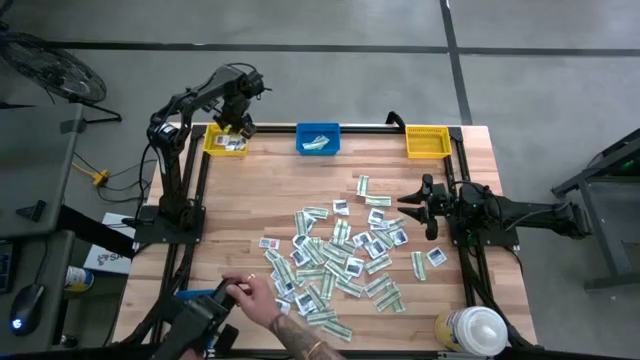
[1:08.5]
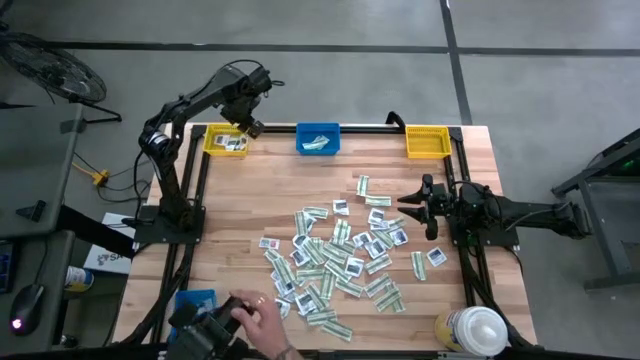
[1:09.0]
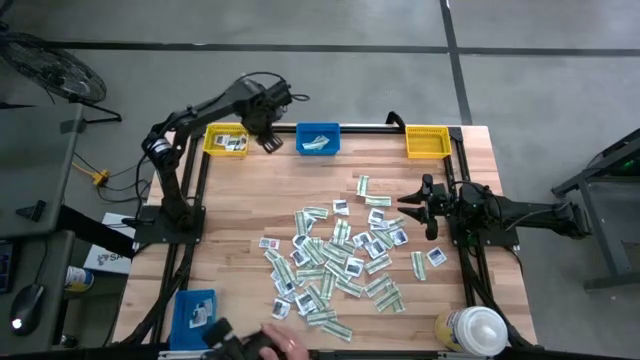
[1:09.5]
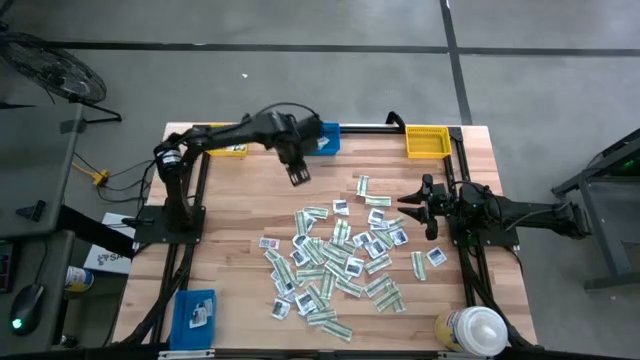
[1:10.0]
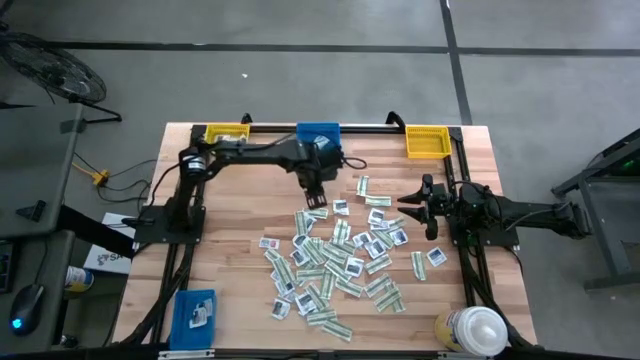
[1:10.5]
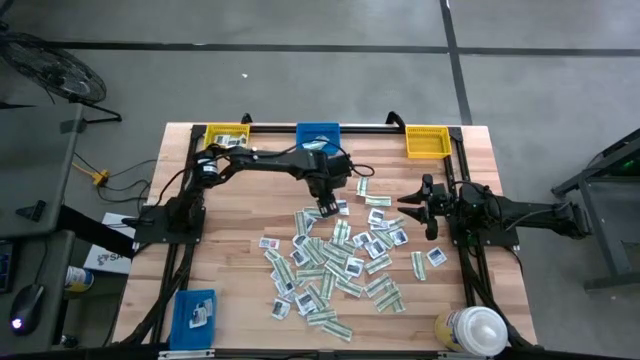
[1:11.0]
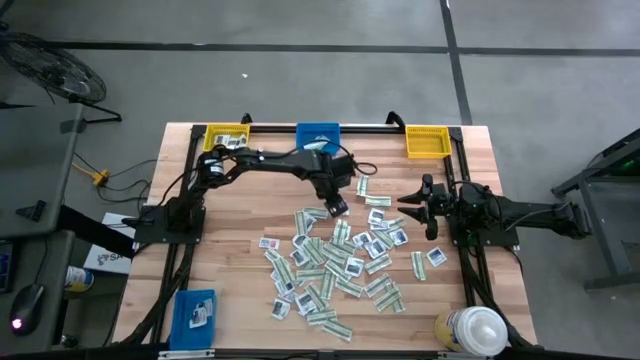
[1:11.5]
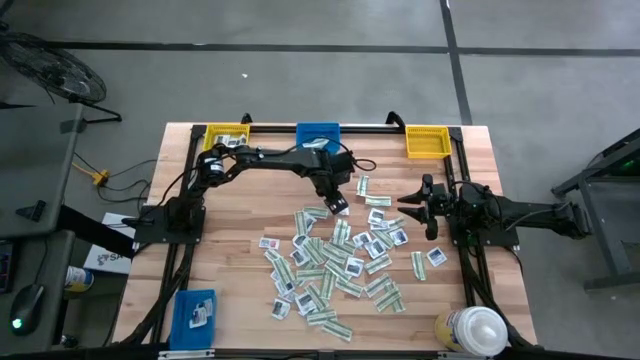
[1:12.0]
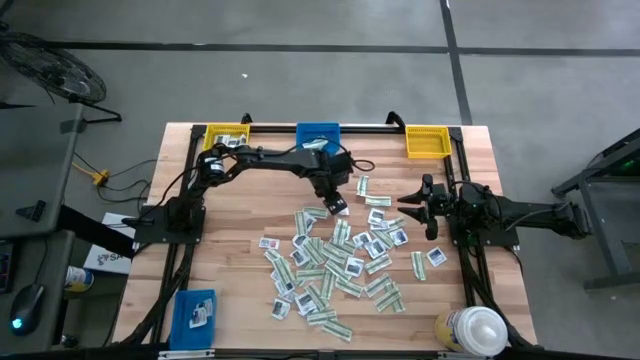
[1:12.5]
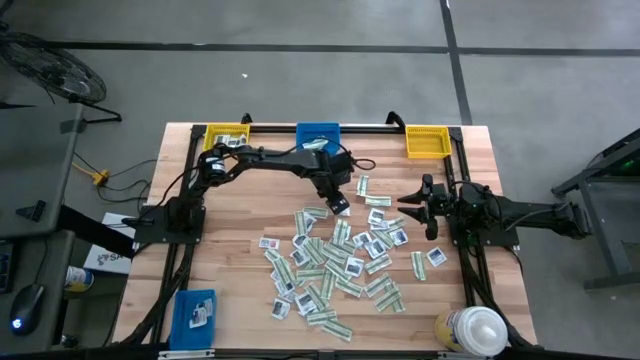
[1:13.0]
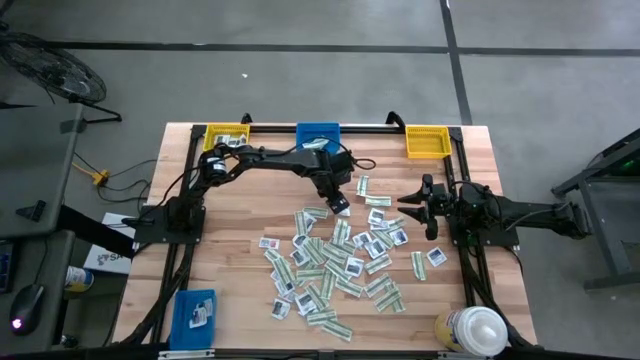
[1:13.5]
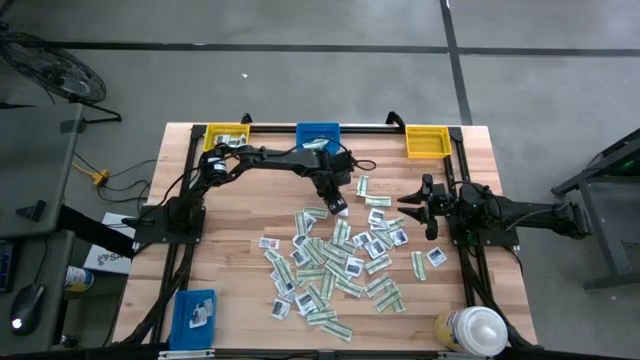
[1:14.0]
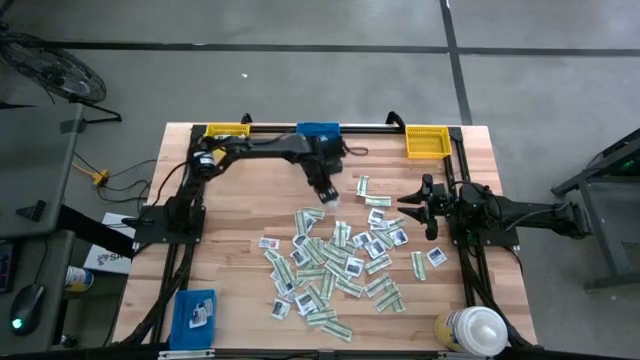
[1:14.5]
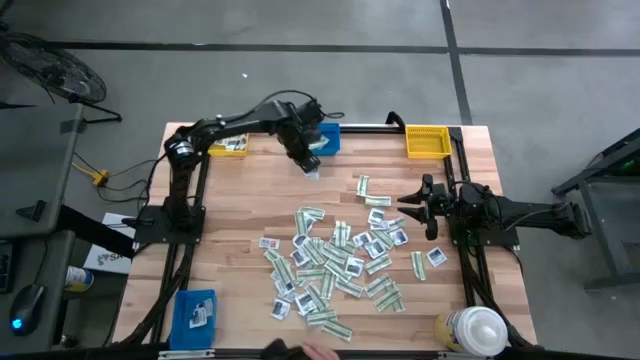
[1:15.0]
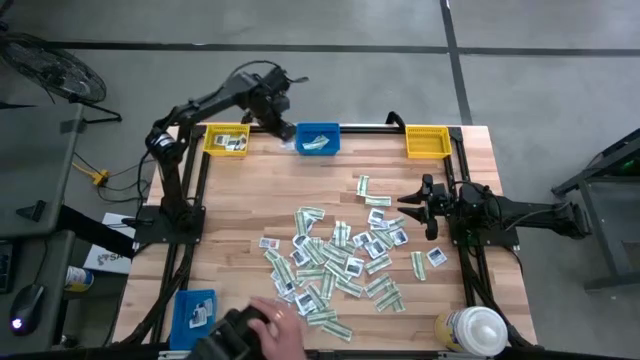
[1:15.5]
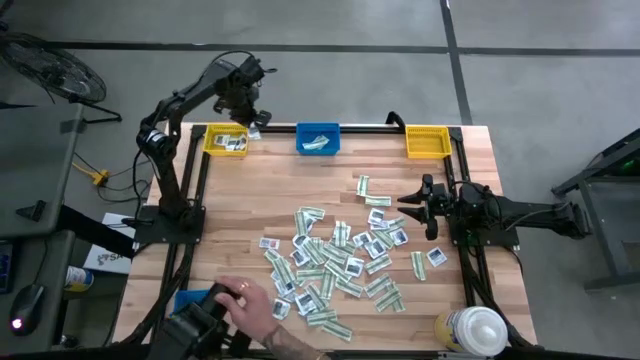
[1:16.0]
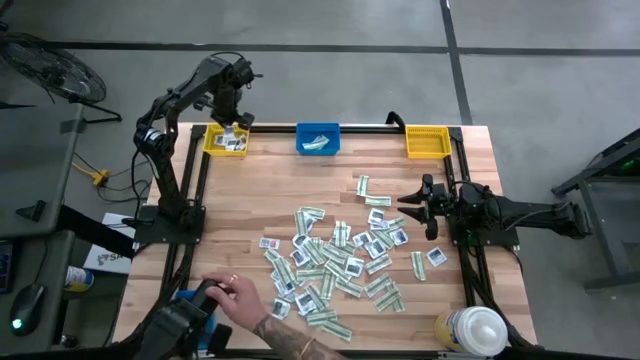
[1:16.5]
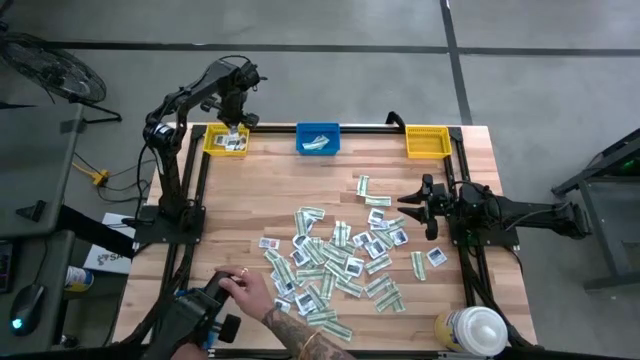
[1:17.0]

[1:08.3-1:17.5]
Task: Pick & Place First Aid Supplies
Put the gray towelette pack into the left yellow bin

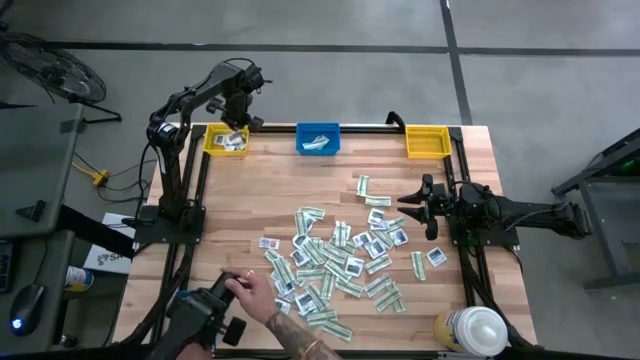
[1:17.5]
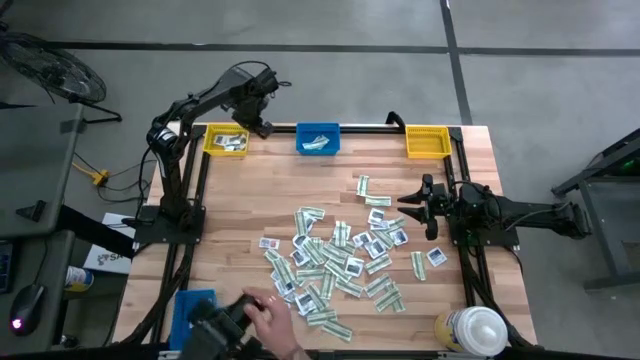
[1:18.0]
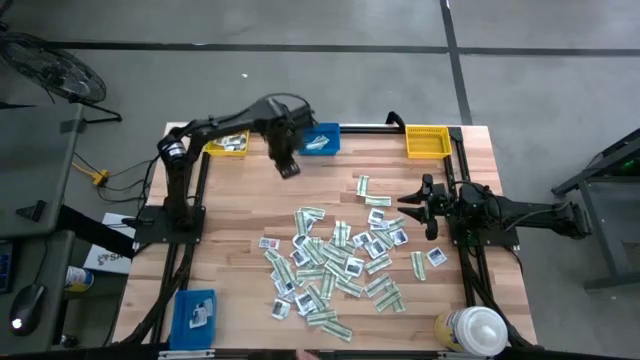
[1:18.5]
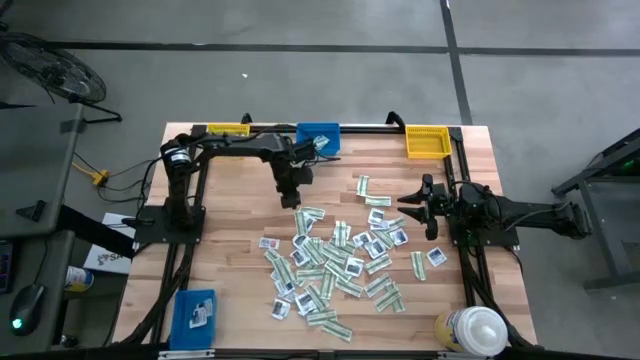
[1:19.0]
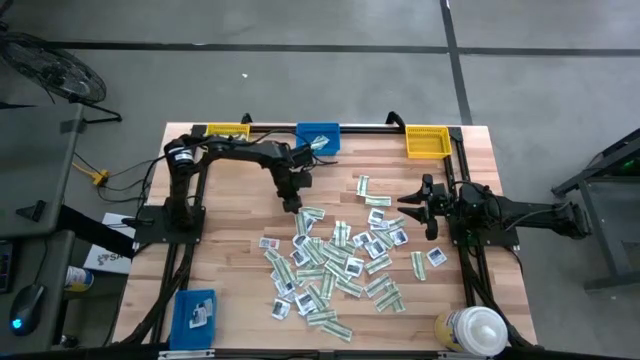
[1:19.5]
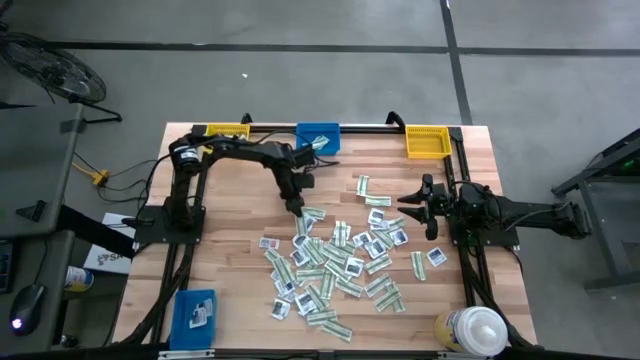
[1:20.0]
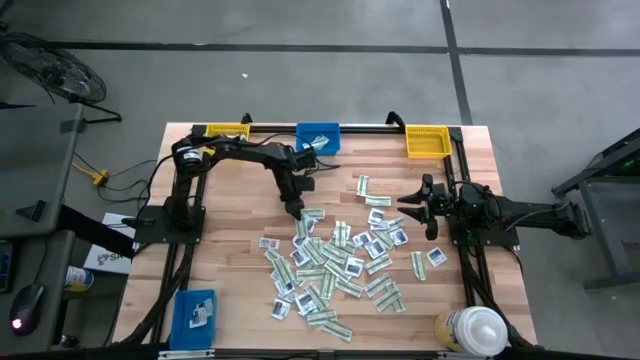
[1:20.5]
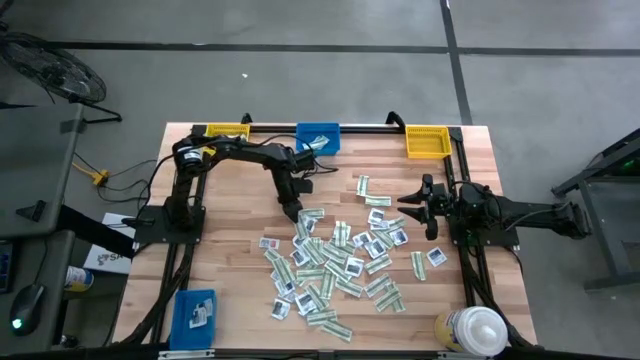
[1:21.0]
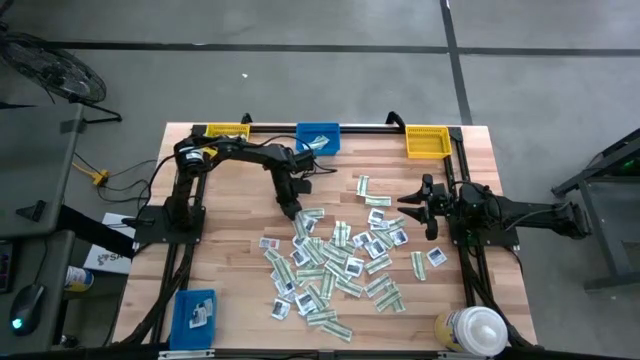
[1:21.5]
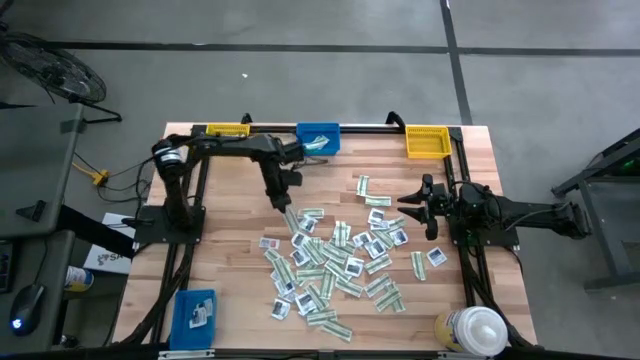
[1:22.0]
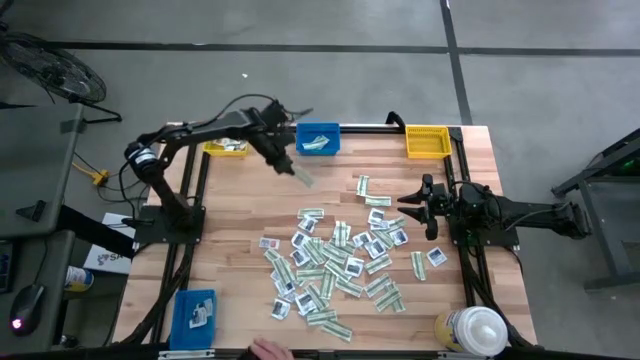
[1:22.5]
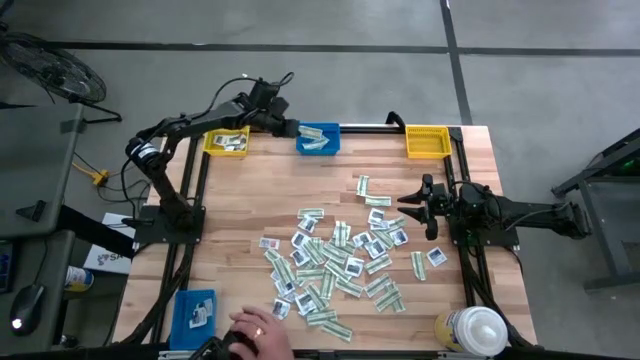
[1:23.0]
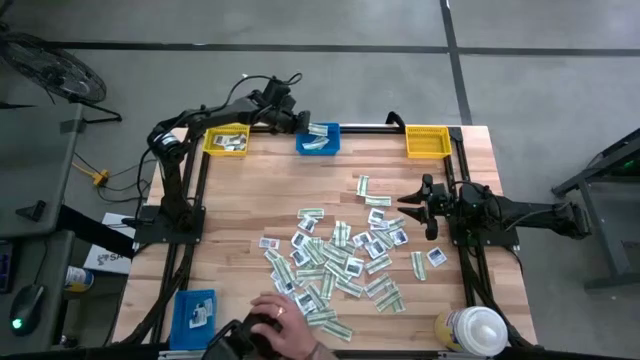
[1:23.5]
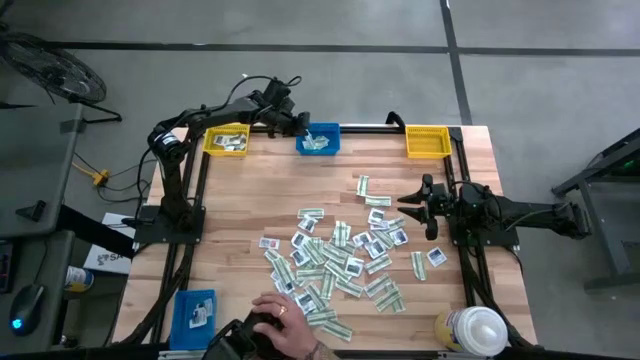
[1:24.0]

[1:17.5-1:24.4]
Put the green bandage pack into the top blue bin

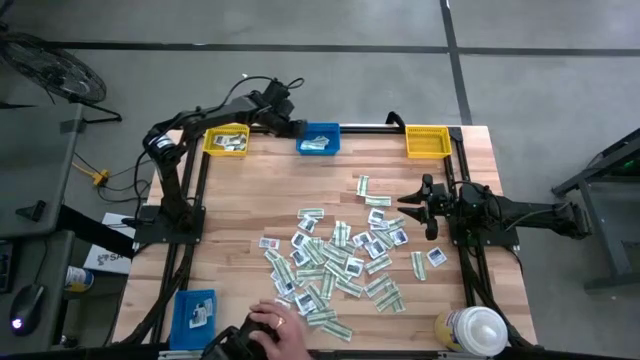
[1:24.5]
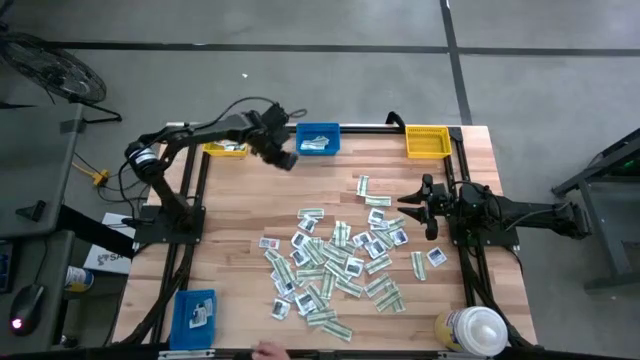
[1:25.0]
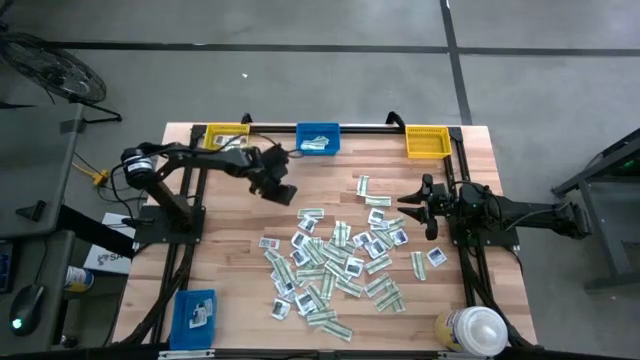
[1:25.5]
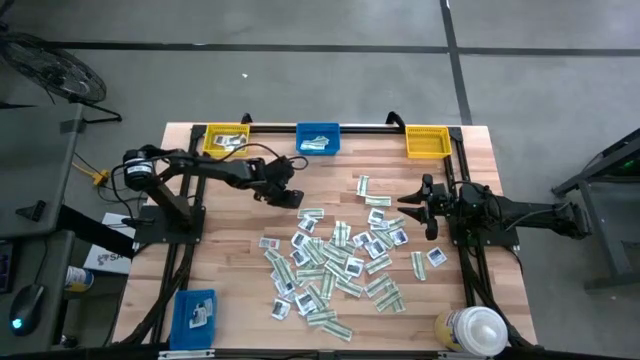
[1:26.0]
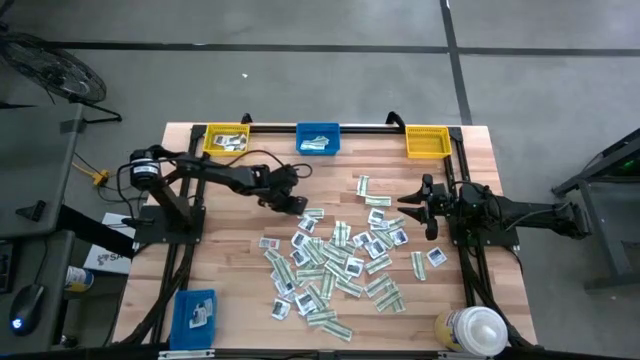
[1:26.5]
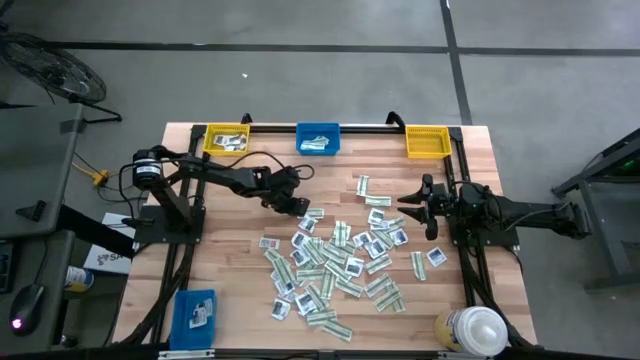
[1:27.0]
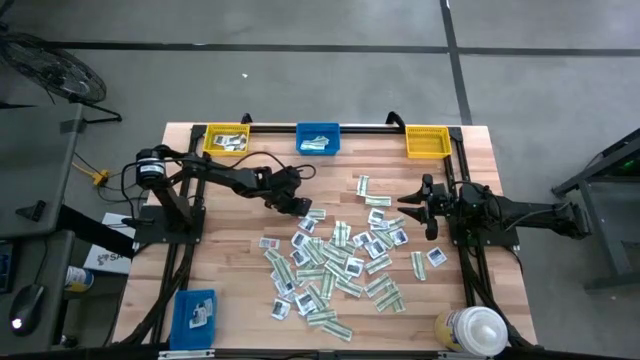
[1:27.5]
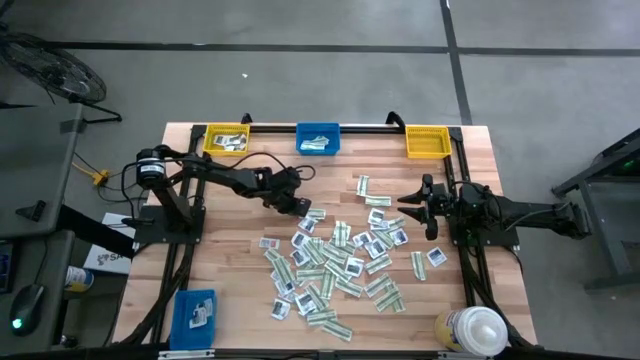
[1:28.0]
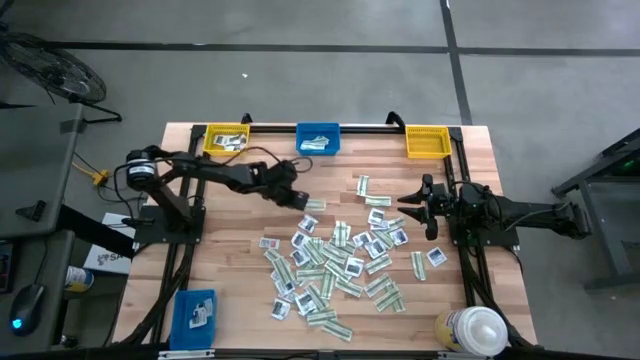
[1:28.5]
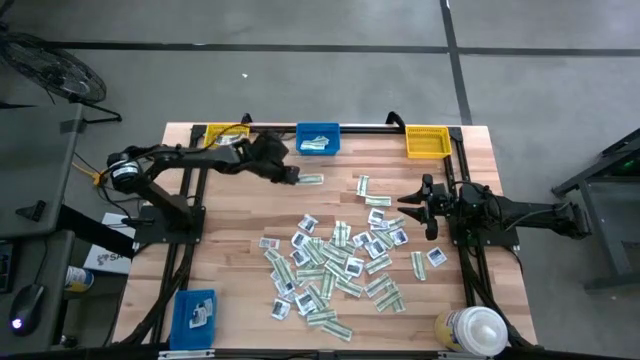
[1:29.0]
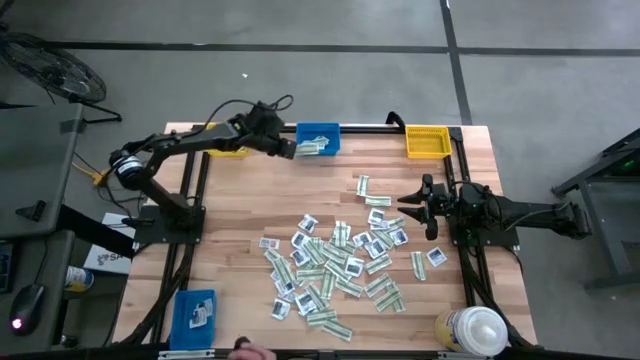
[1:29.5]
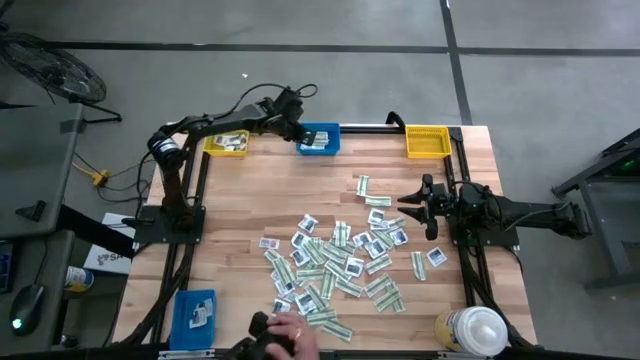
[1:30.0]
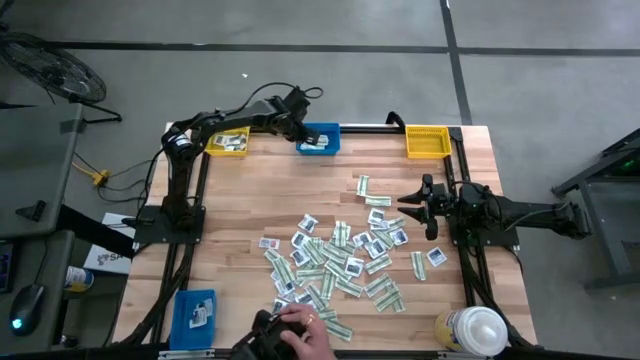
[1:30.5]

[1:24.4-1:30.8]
Put the green bandage pack into the top blue bin
